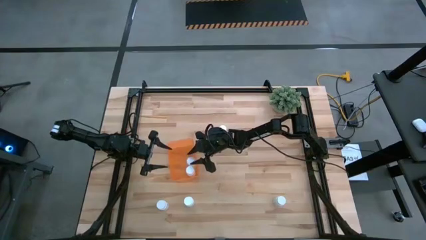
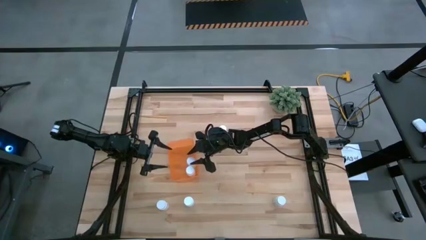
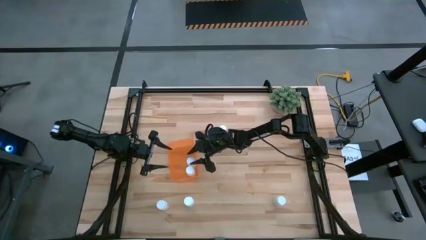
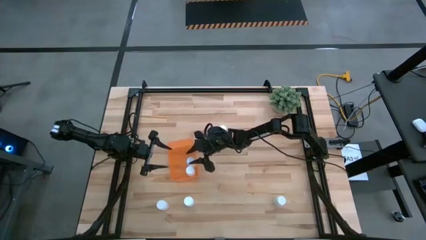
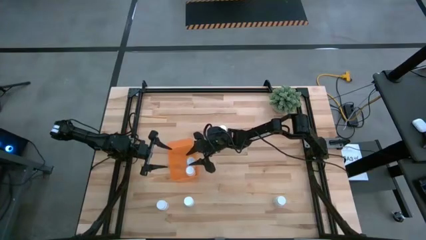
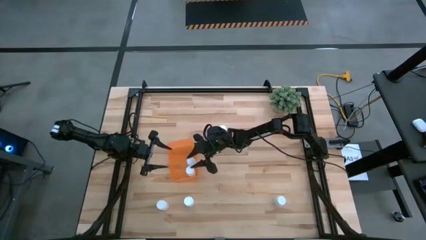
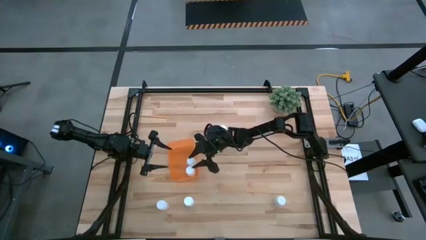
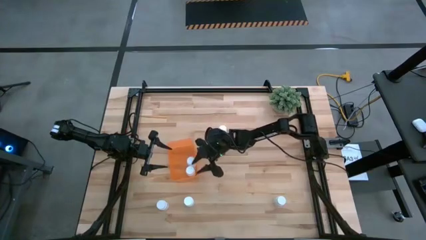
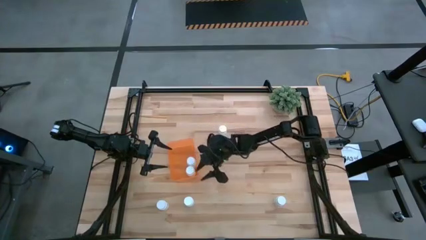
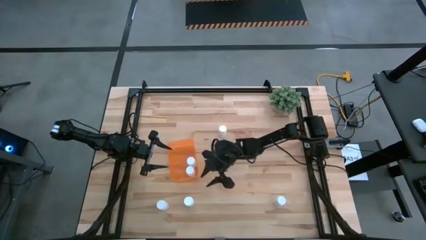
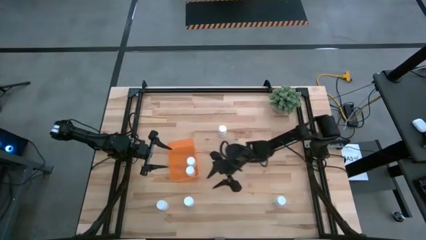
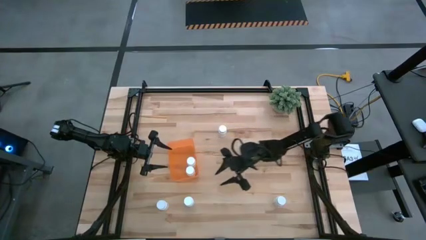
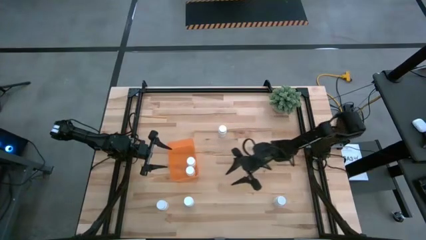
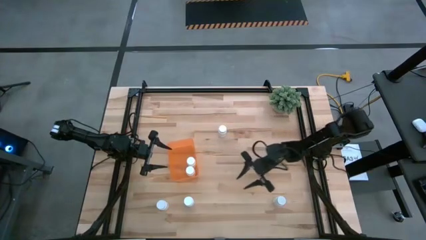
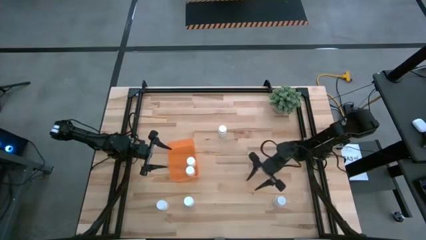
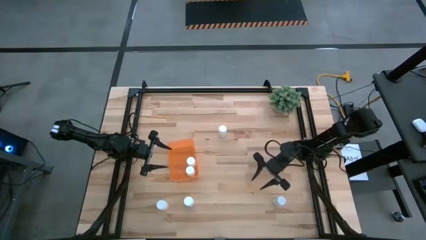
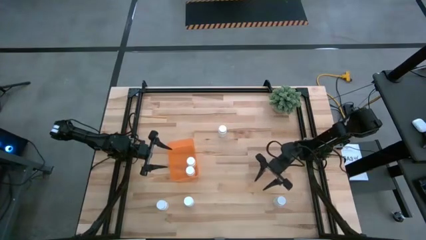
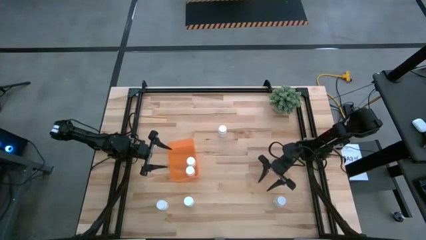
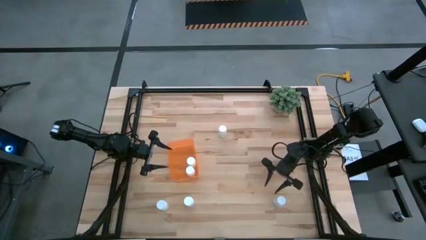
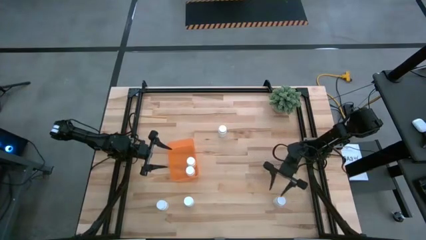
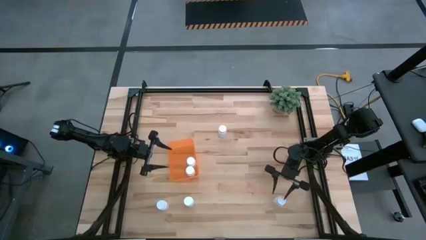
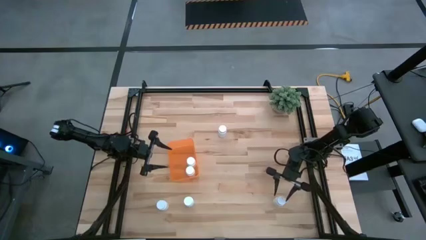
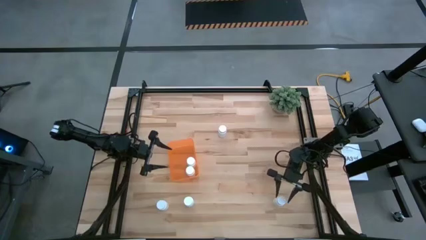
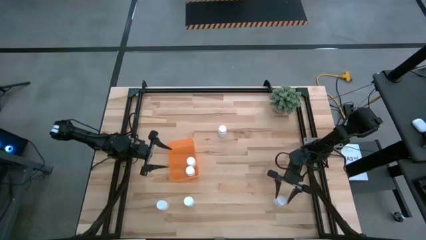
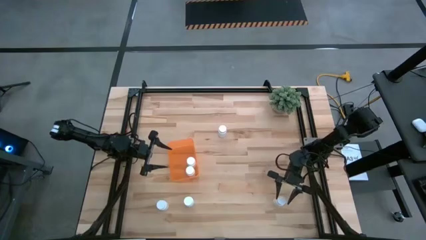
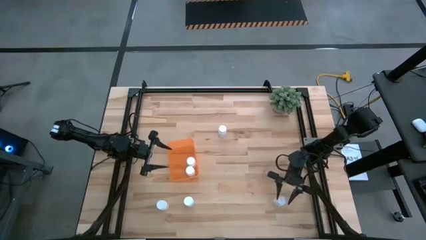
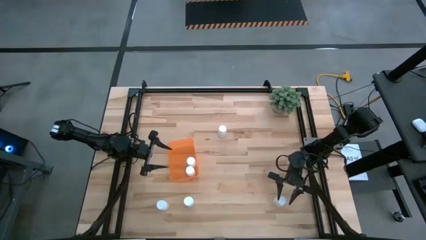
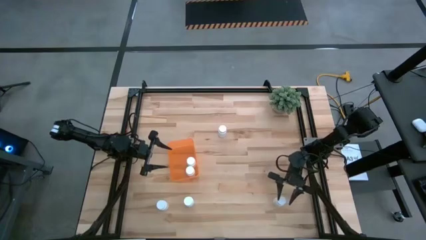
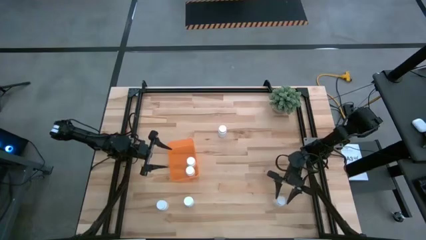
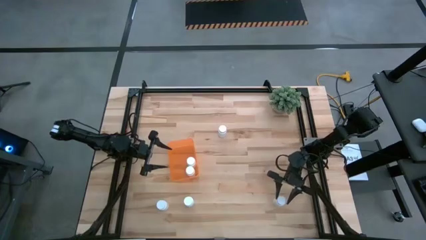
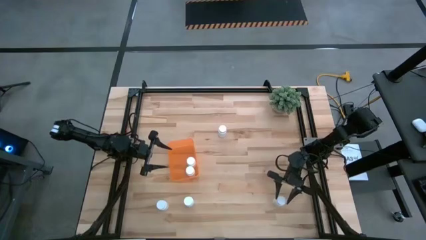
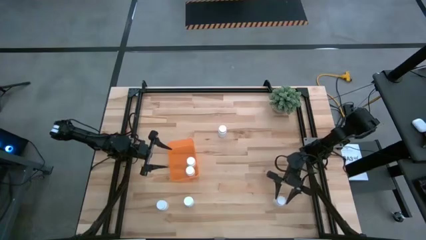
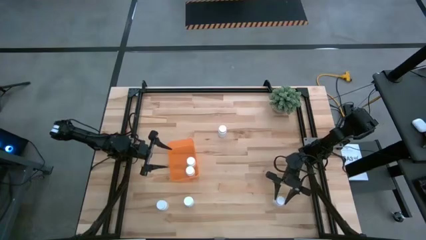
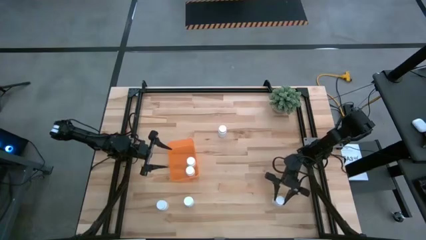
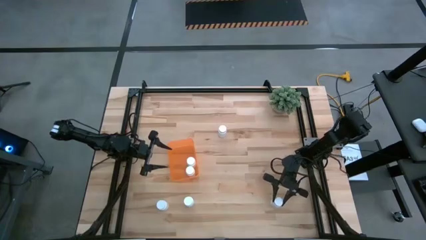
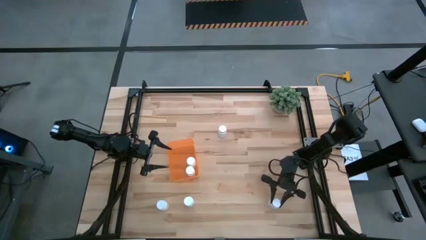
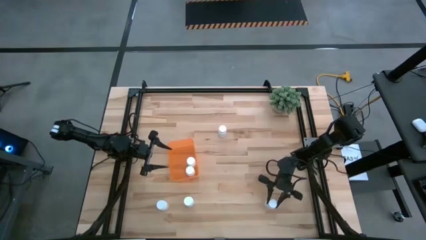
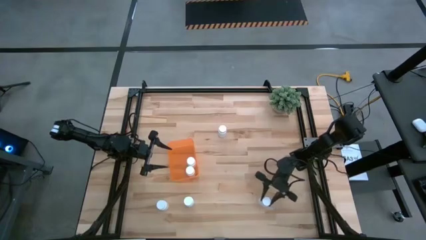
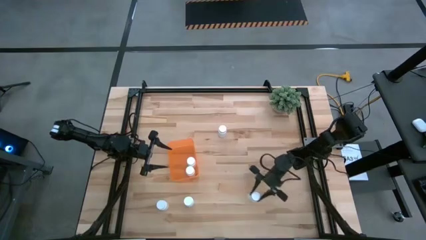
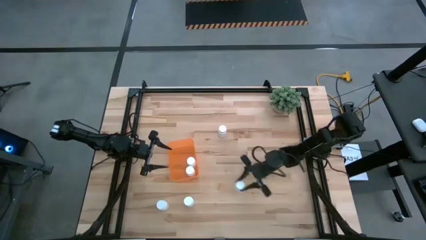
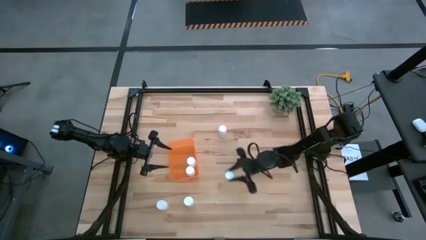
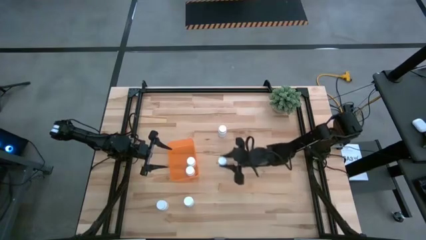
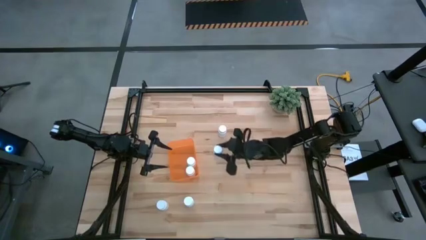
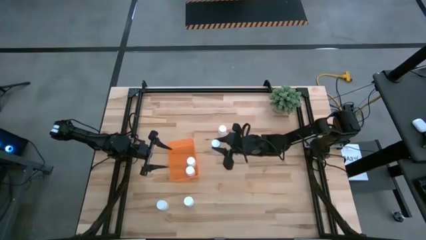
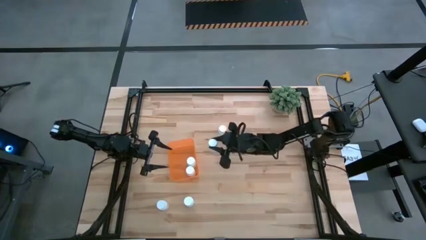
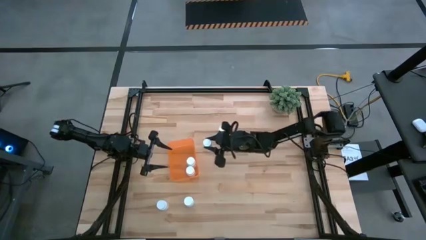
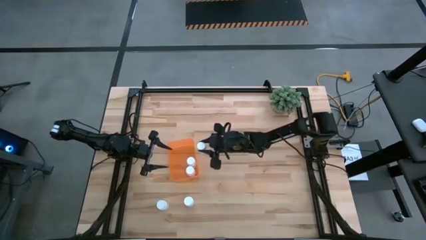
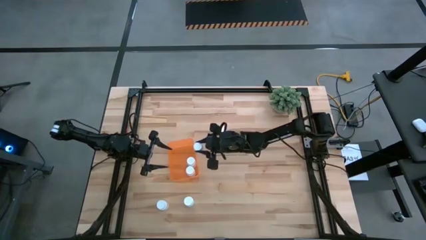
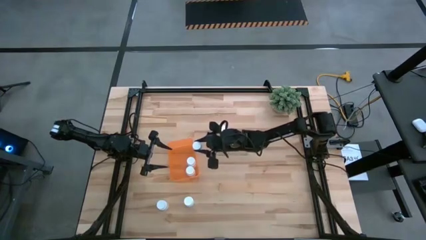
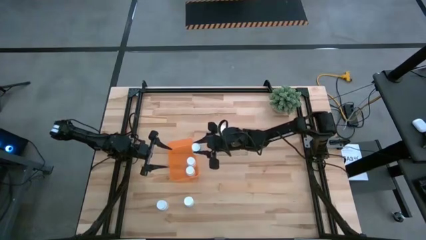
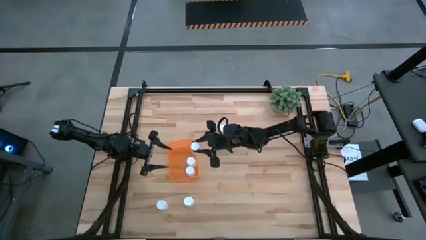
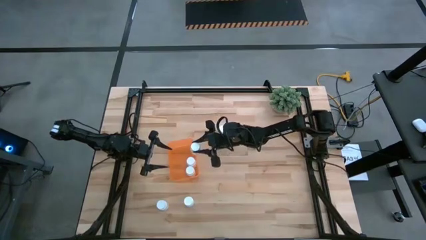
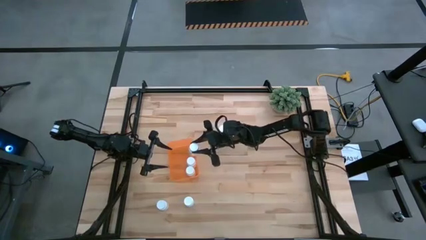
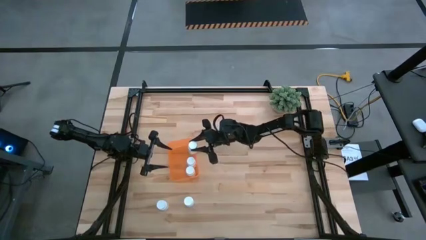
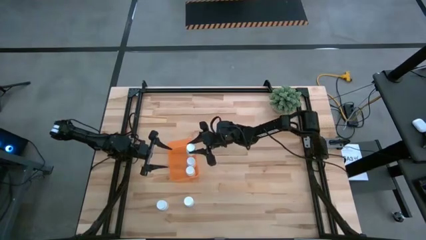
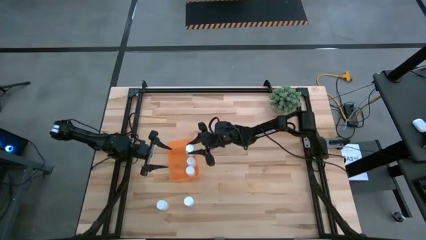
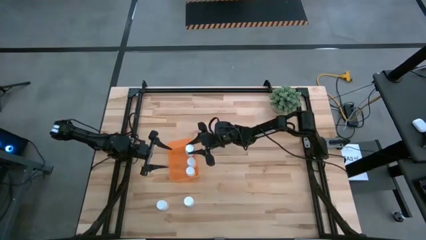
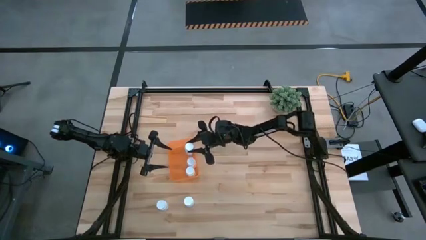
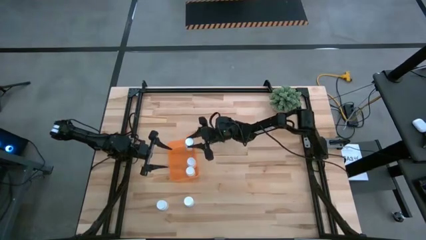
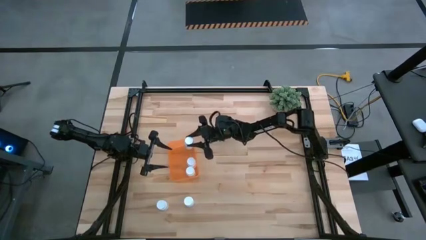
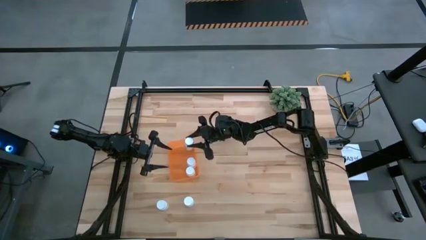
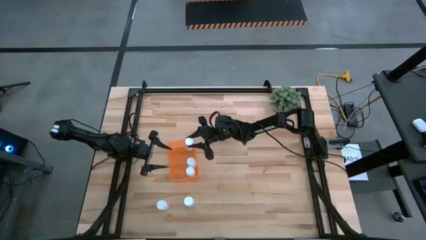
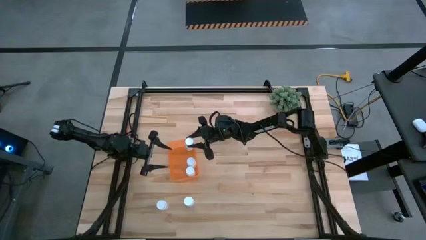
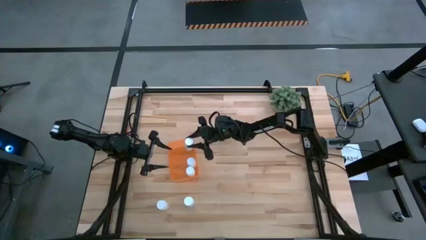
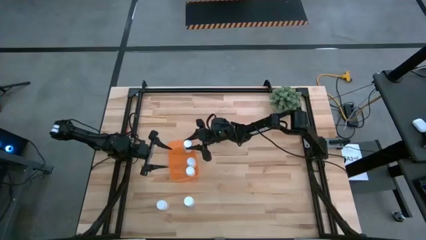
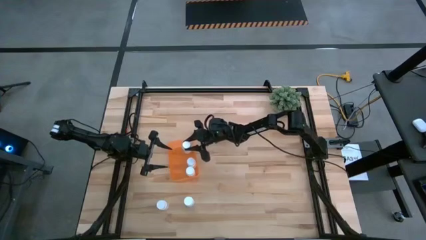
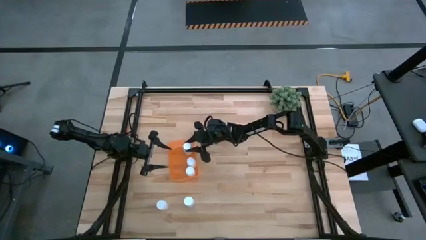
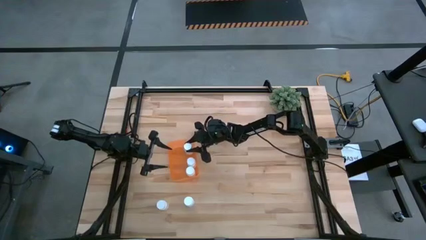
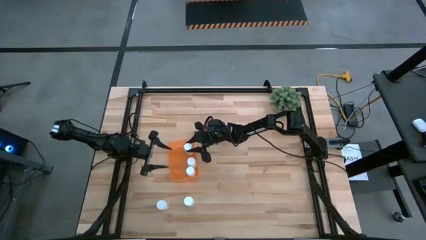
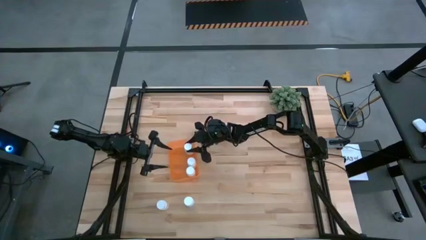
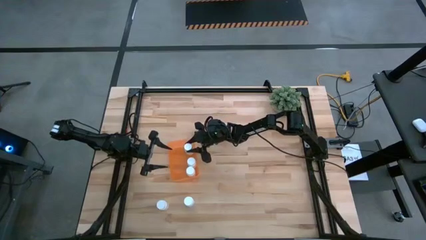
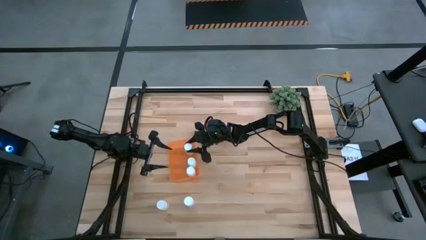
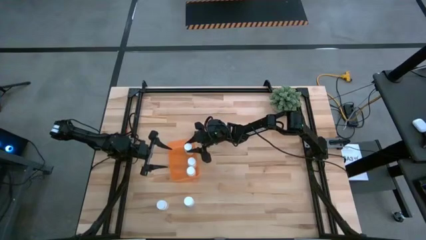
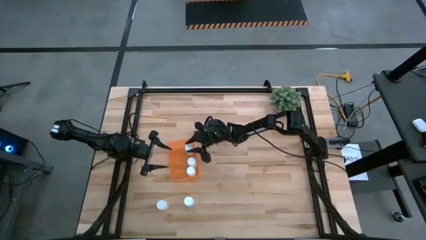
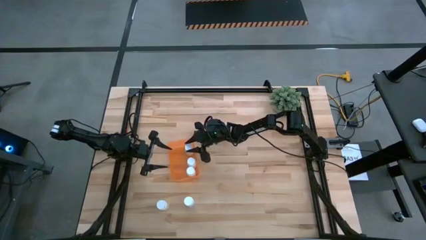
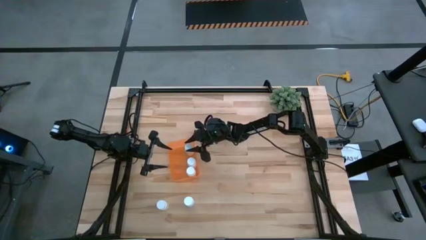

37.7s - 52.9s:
Task: Pick and place pill bottles into a basket
Put the white medicine bottle into the orange bin
